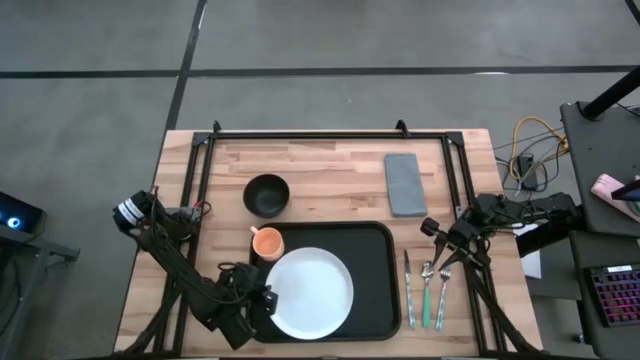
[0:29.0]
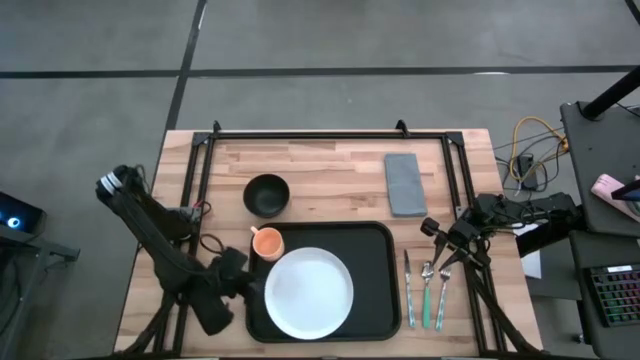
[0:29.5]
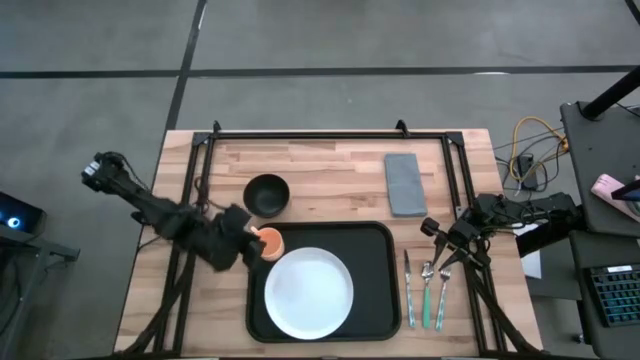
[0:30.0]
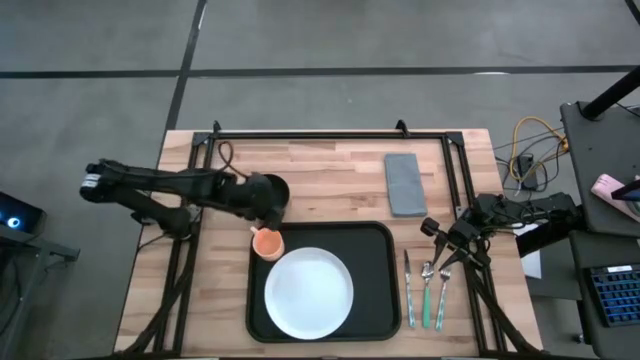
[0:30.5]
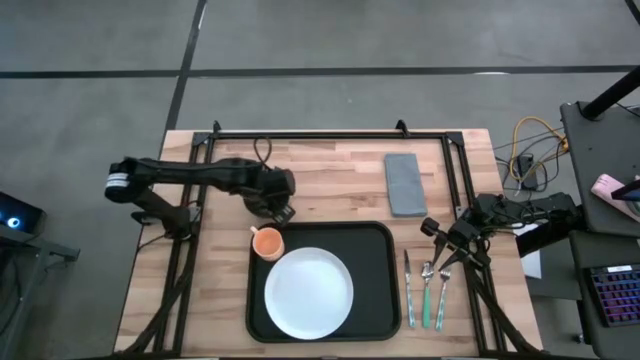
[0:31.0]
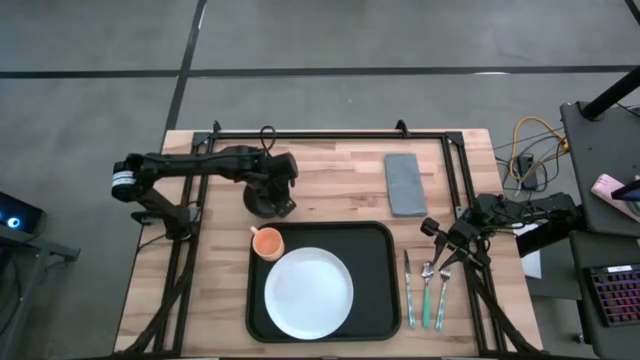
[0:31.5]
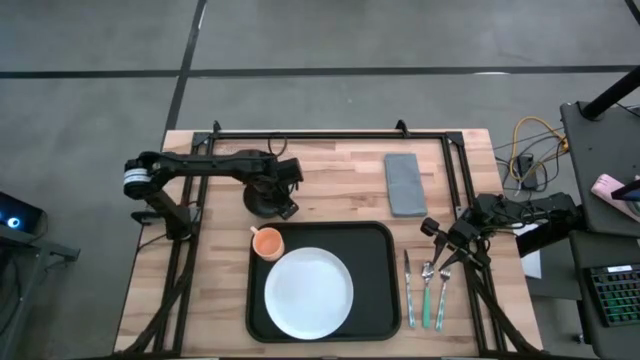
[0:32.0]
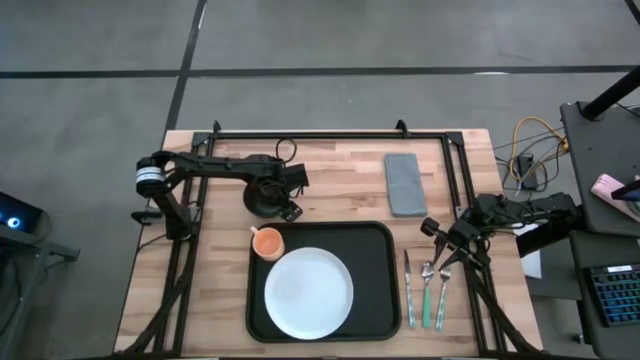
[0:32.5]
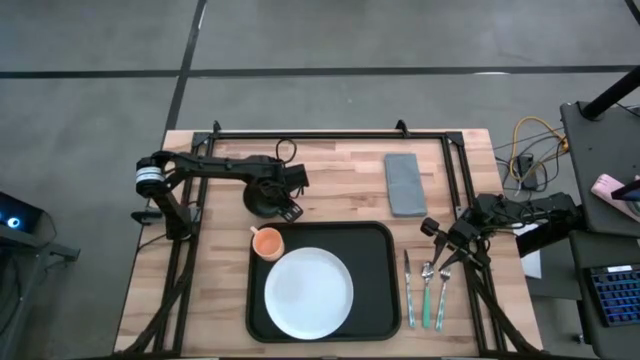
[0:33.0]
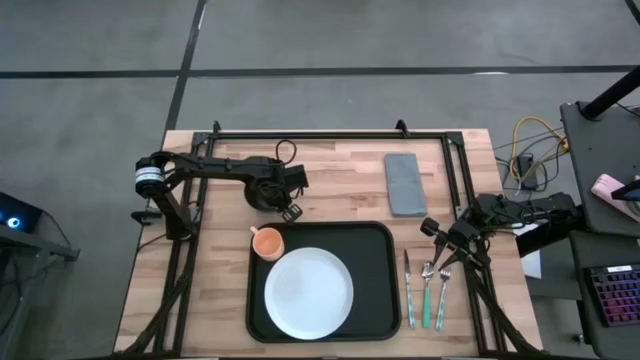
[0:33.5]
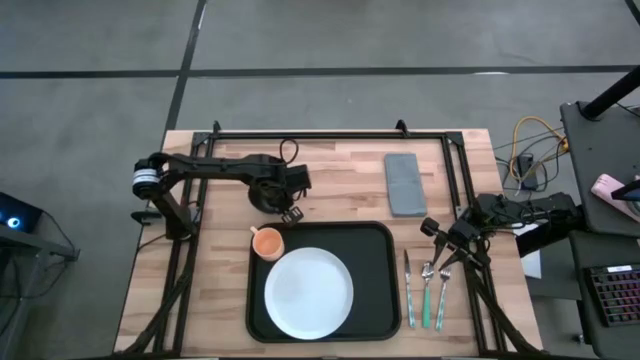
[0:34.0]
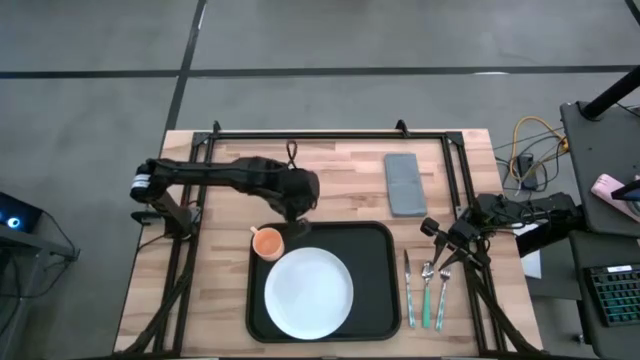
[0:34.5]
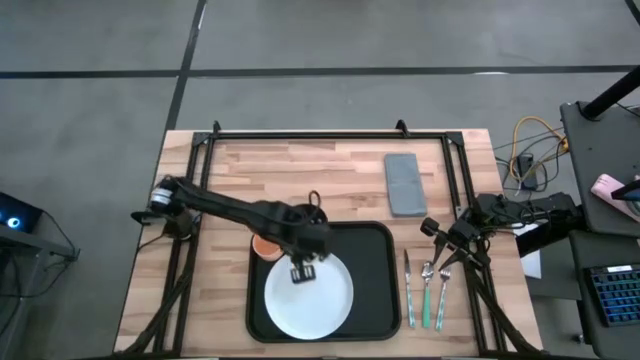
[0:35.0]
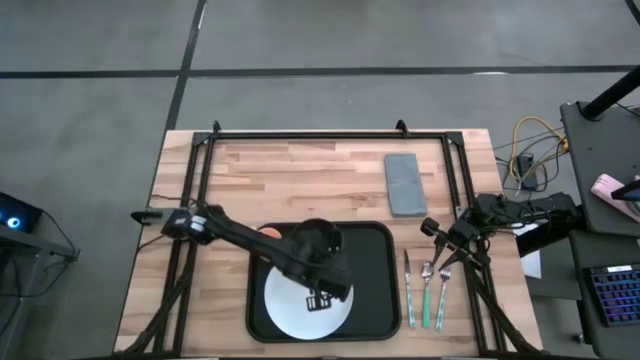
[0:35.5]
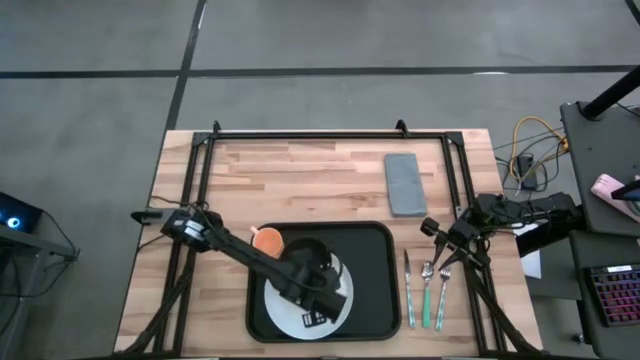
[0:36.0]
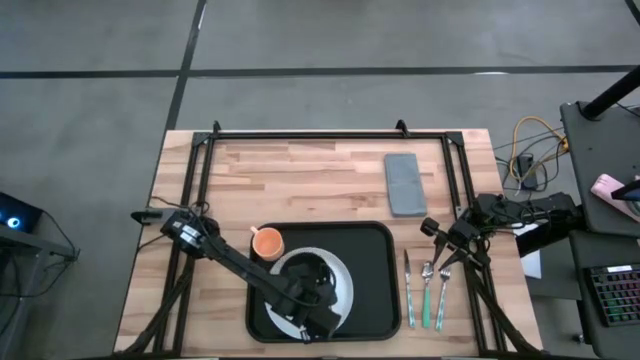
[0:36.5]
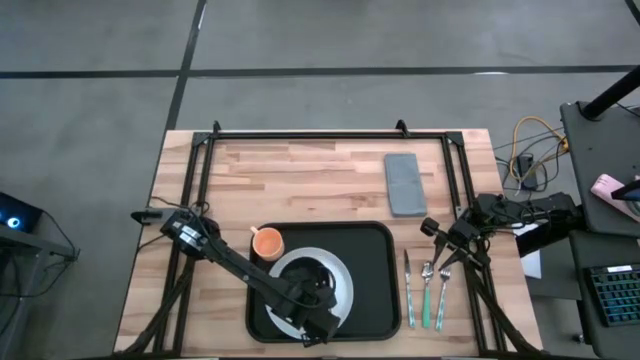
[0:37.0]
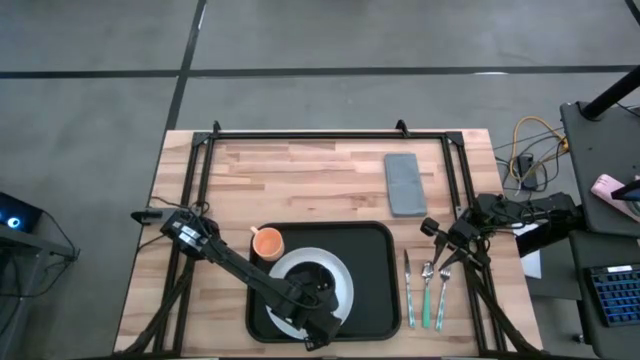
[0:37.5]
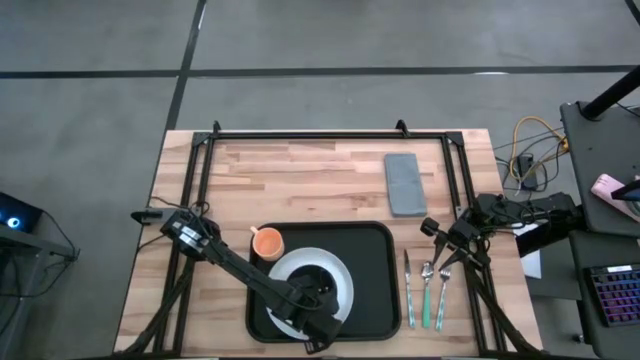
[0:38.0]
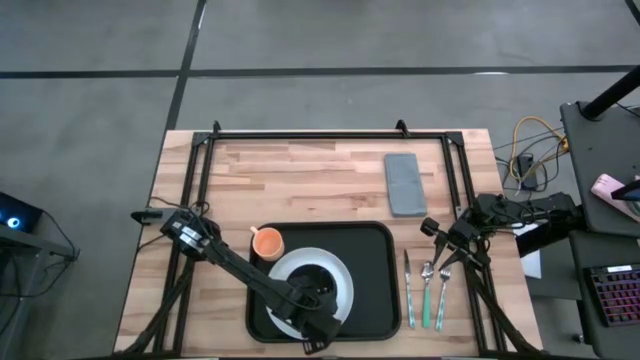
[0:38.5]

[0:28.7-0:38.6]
Task: Set up tray
Stack the black bowl on top of the white plate on the black tray

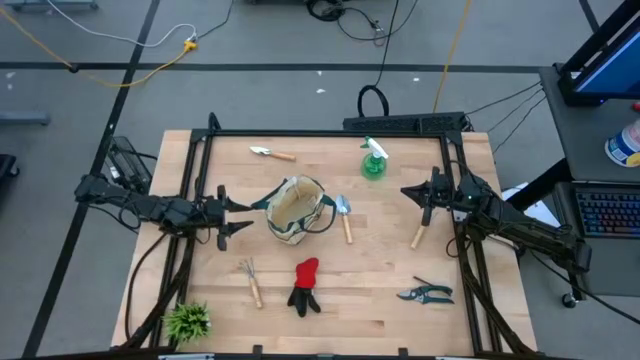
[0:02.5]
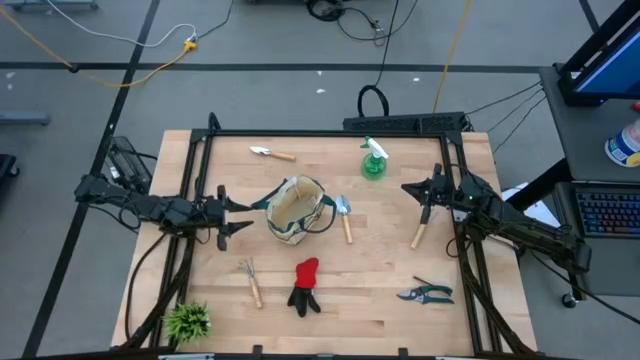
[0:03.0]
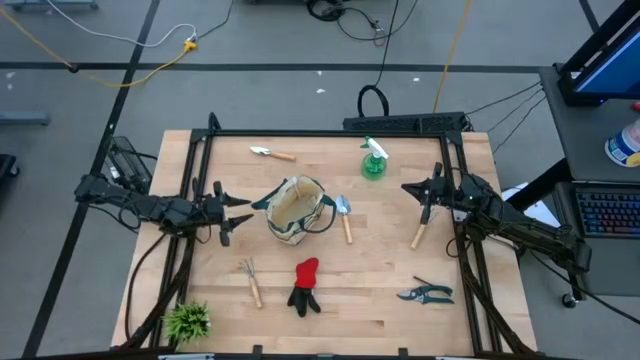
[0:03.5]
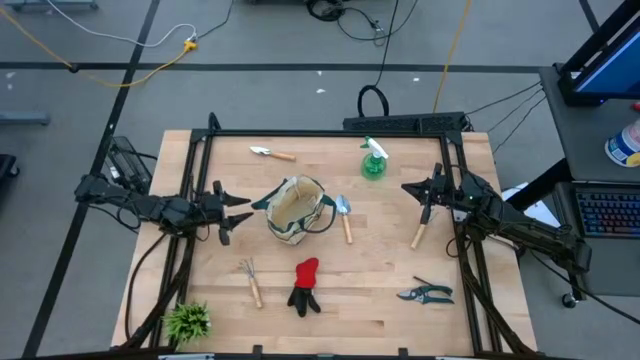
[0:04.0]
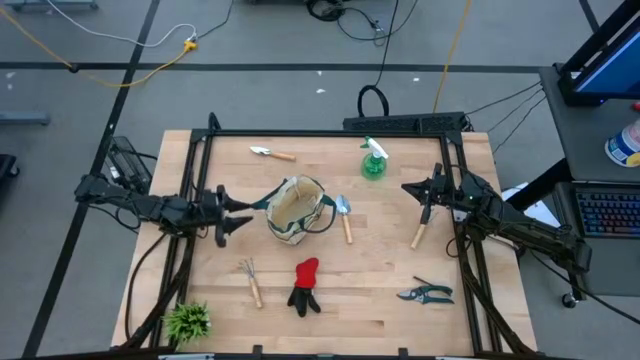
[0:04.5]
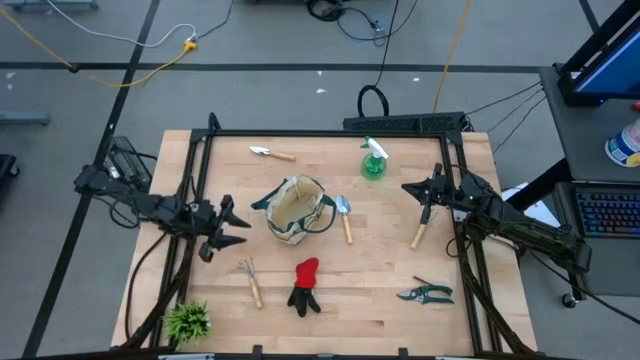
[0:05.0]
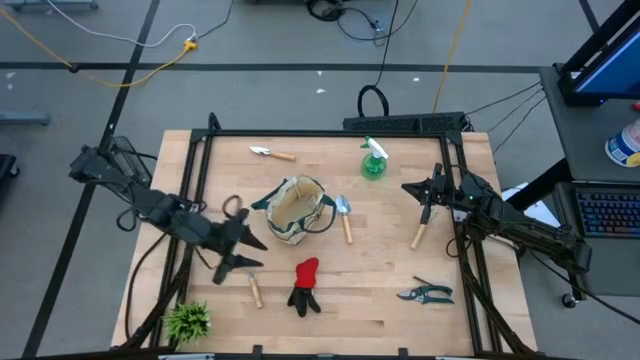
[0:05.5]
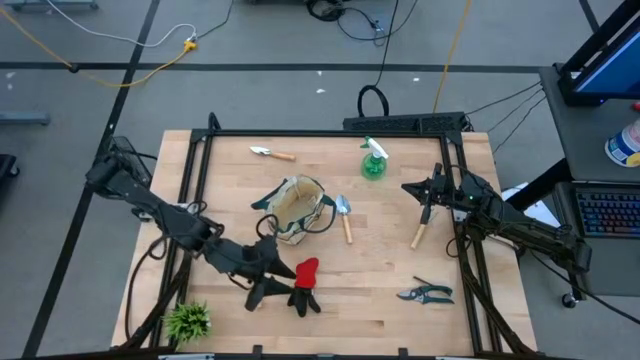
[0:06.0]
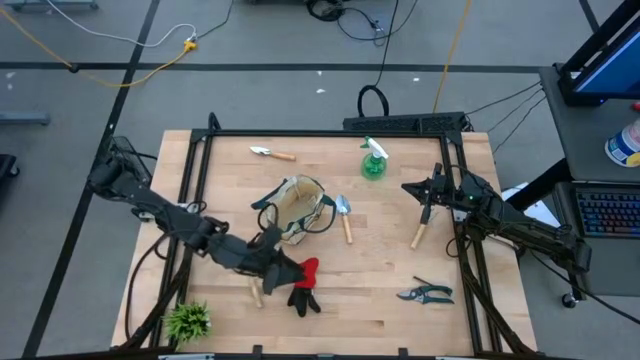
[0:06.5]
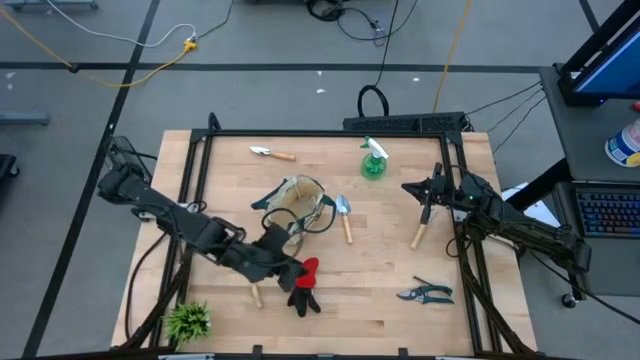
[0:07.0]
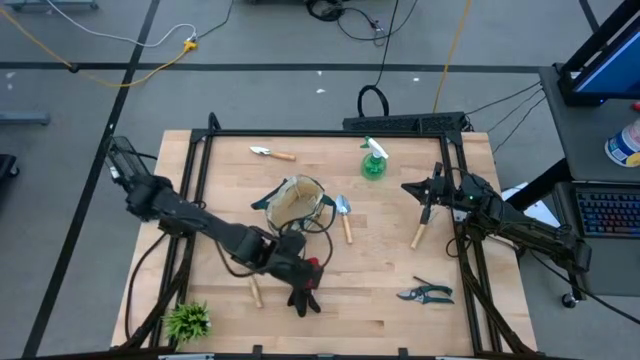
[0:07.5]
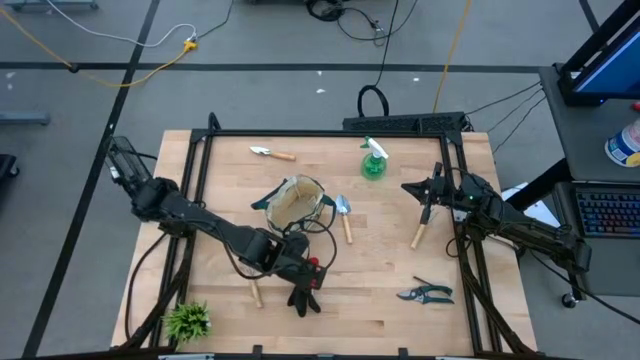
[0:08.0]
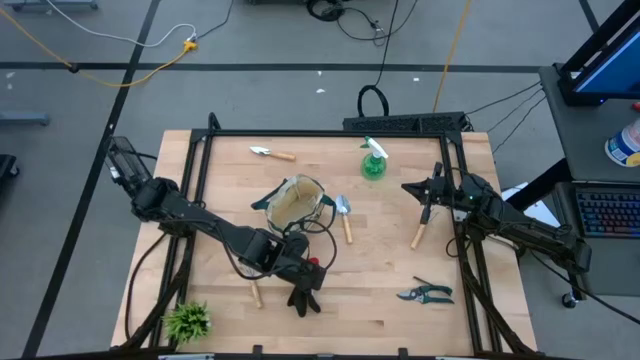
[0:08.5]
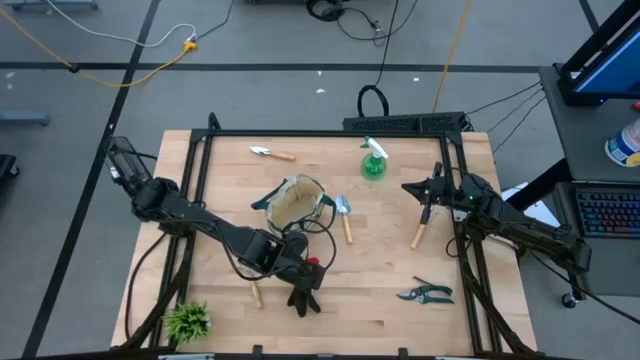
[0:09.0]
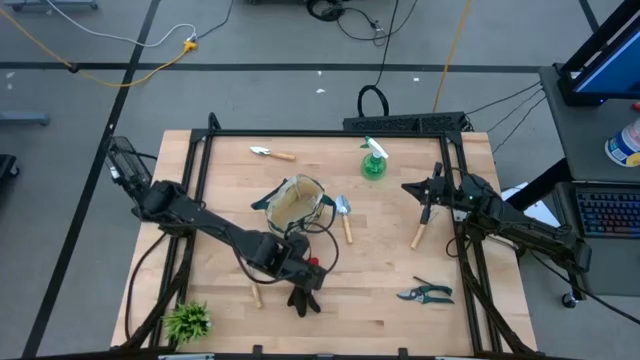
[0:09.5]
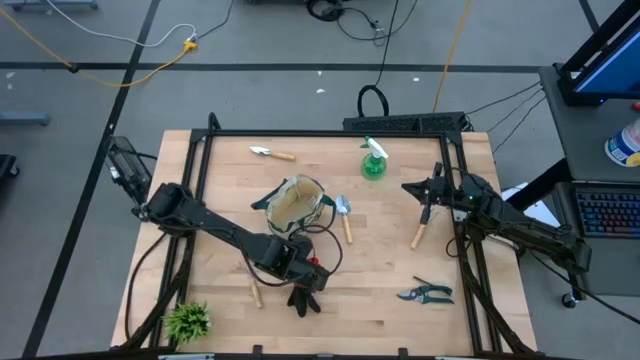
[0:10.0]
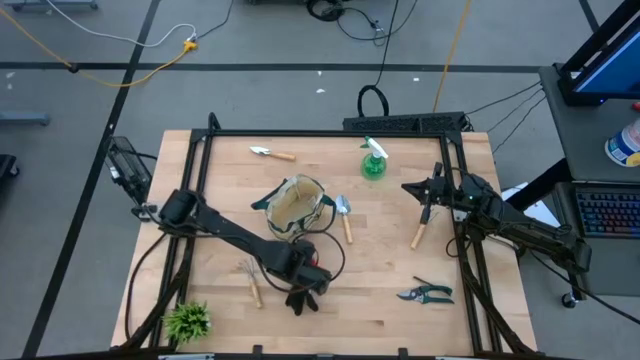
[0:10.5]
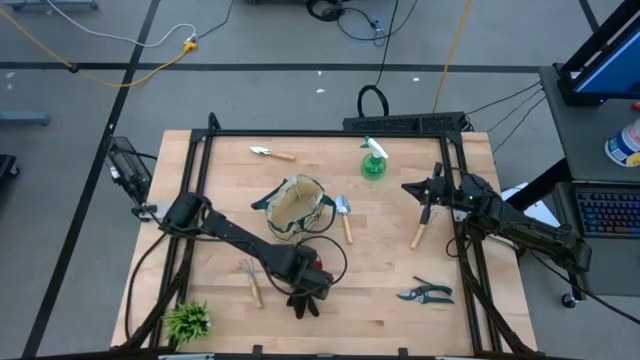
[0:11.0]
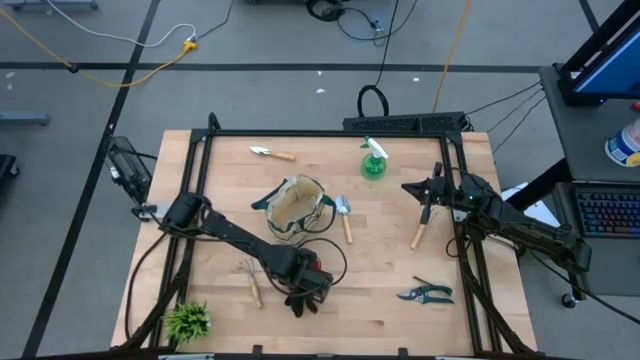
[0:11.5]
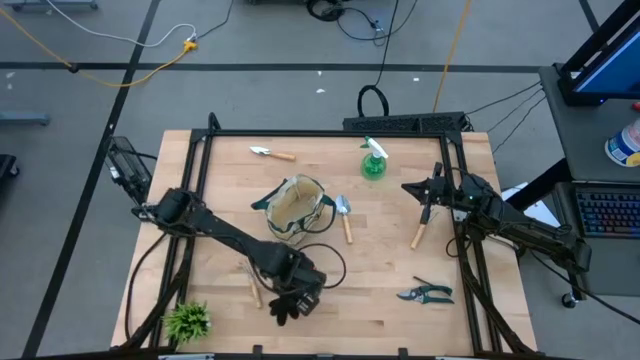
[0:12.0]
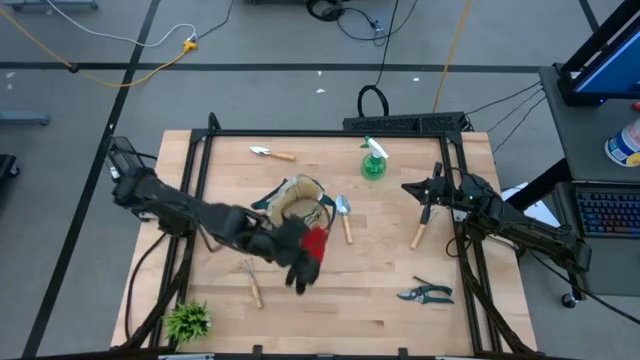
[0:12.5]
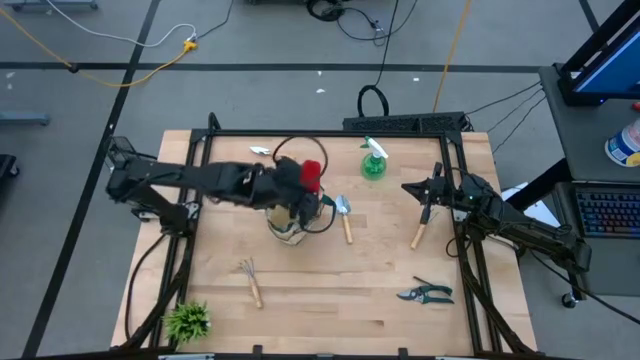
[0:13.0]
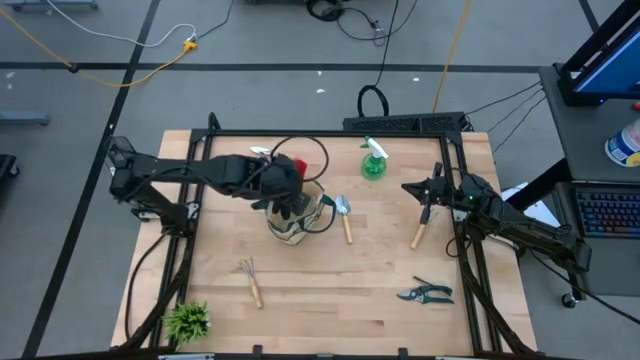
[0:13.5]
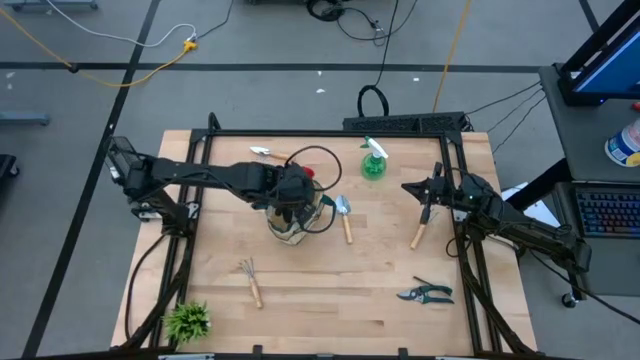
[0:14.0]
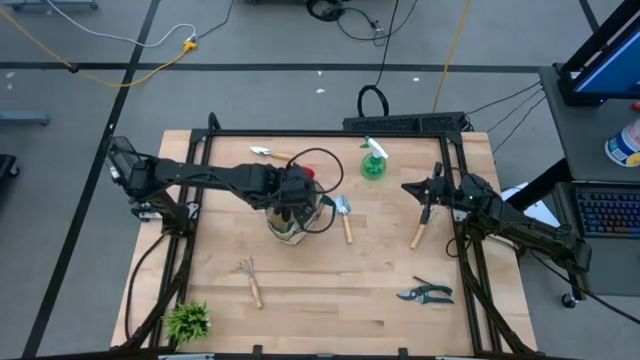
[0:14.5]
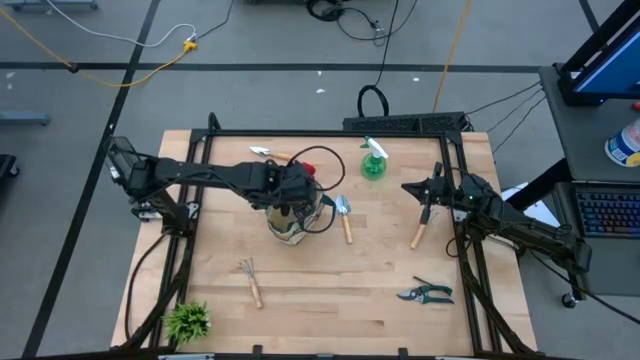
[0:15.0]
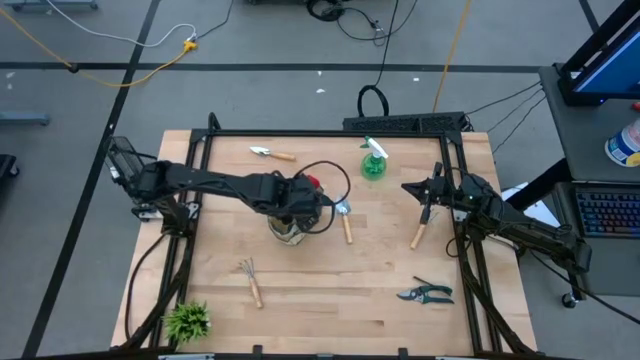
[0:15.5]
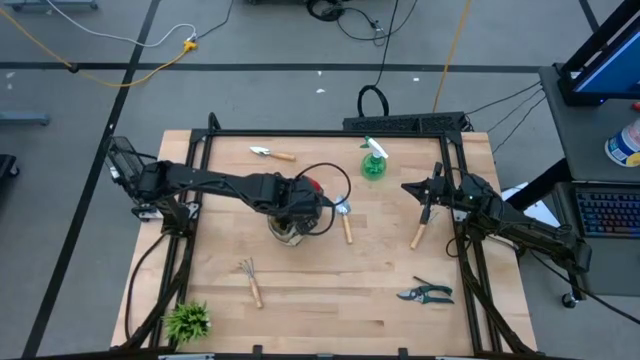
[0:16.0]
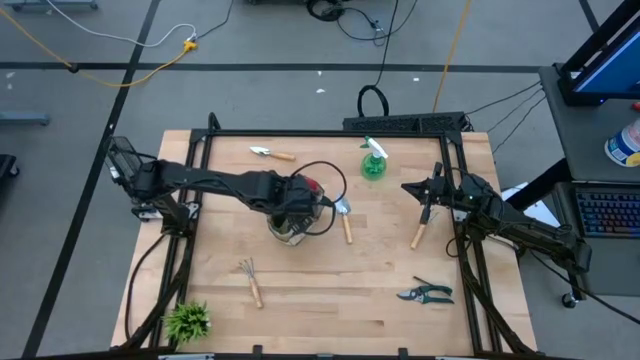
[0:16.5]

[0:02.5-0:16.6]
Task: Pick & Place Garden tools in Gardening bag
Put the red gloves into the green gardening bag
